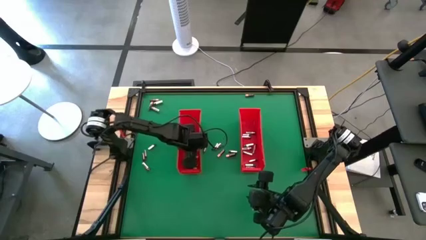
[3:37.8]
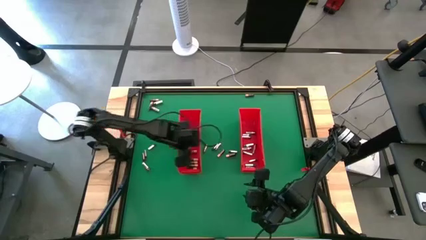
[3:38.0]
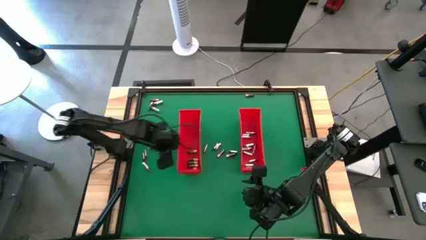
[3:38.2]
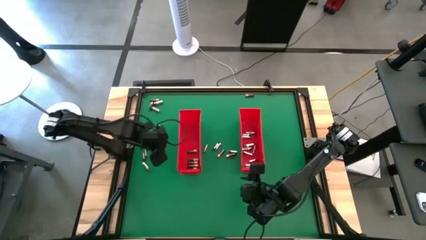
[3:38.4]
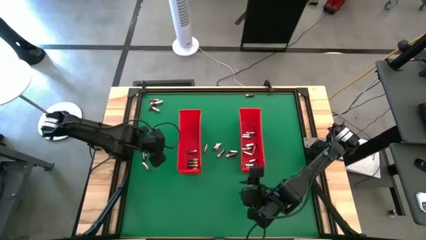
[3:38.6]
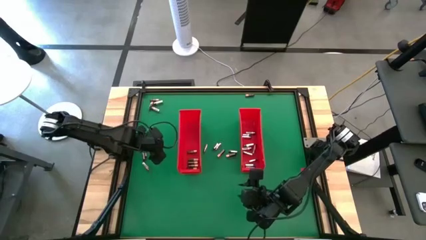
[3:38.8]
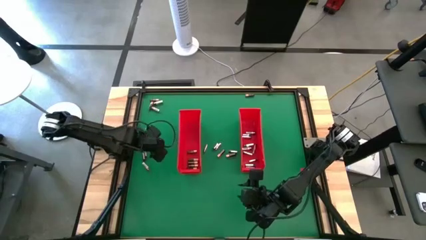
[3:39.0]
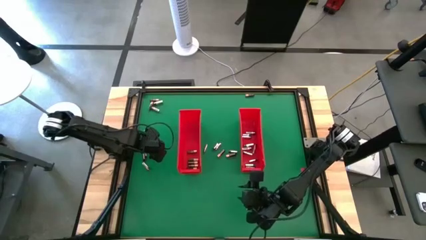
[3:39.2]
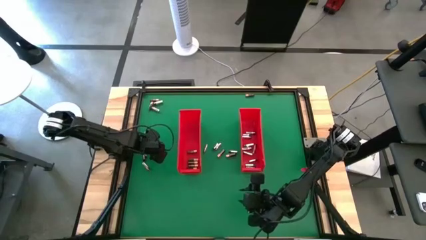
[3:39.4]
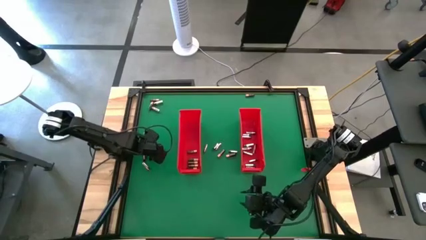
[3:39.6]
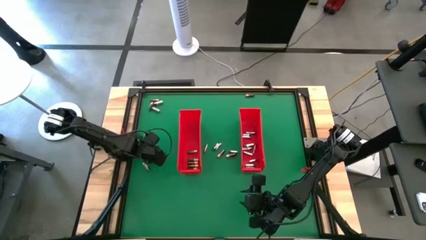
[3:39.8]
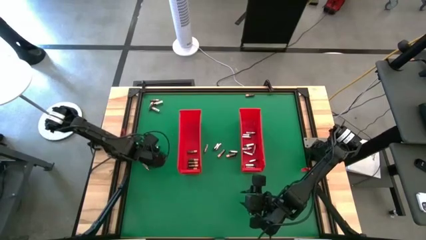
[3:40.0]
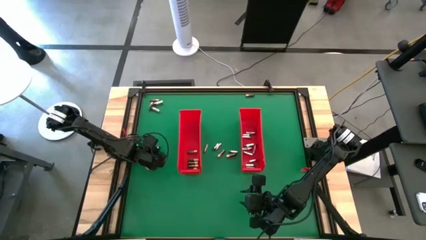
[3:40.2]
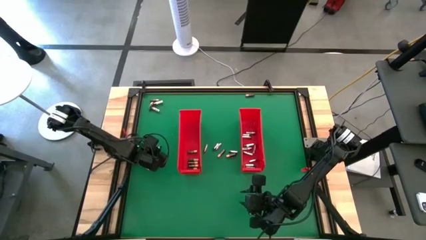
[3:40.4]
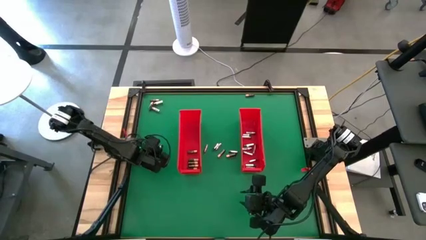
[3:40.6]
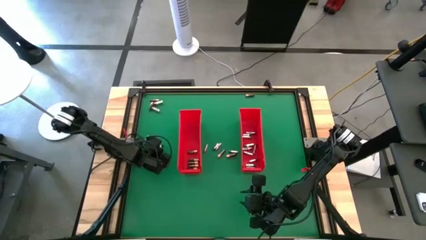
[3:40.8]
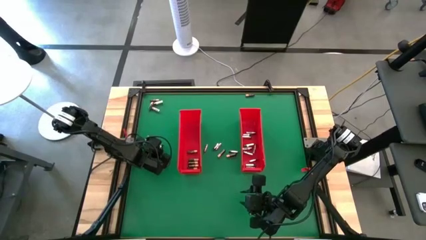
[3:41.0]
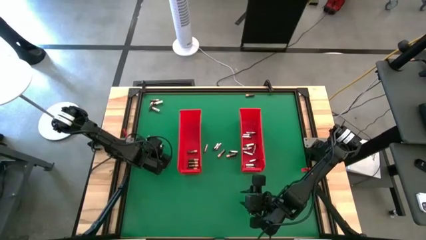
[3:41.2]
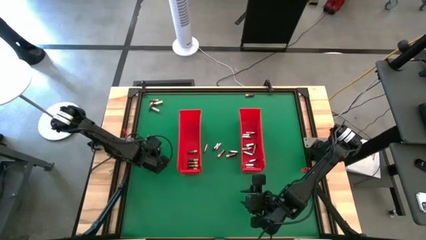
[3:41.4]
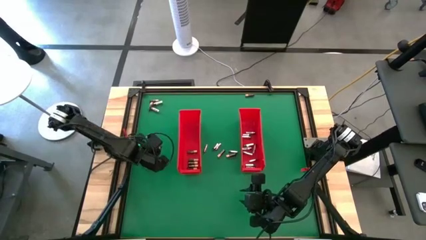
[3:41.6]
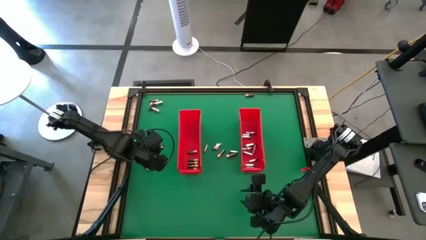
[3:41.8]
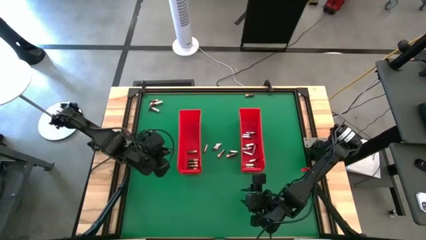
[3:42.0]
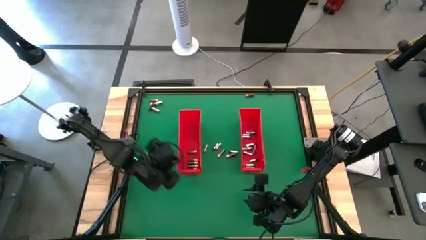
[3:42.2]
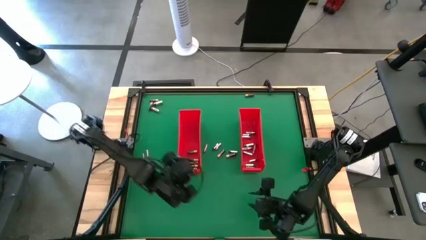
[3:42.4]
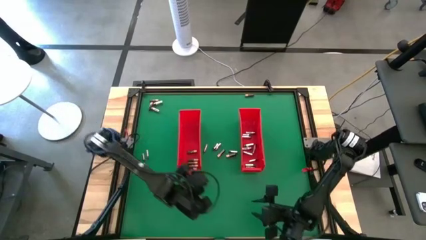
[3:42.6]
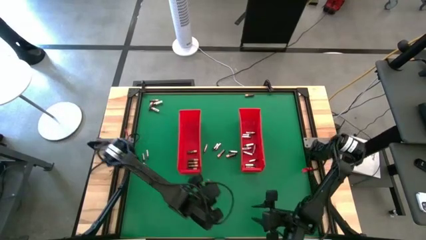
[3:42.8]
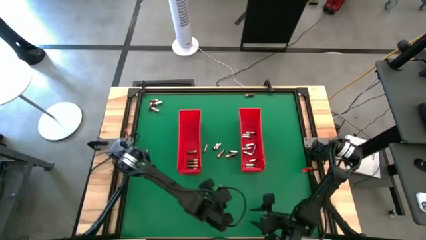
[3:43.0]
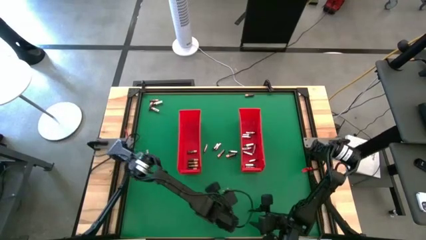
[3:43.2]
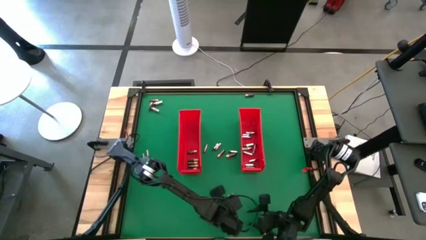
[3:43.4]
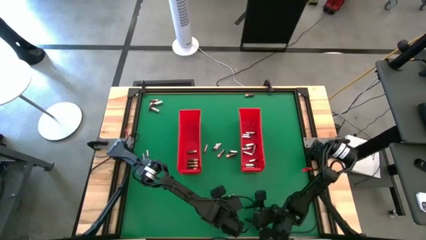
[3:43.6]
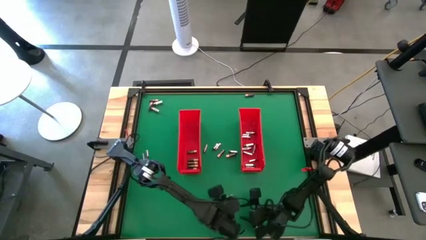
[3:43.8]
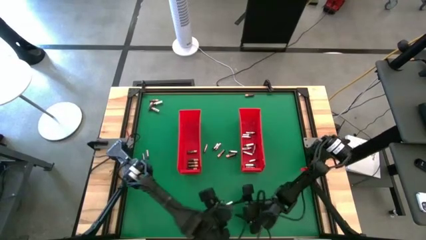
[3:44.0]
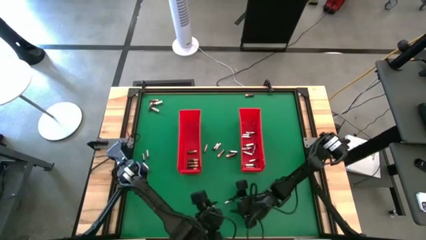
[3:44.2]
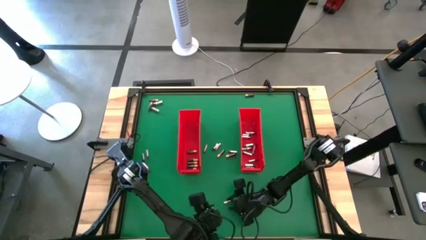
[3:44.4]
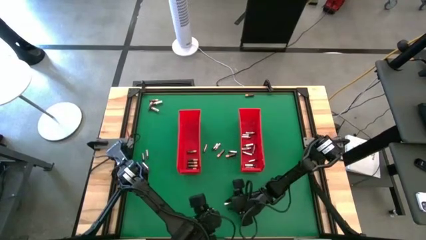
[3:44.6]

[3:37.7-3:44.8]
Task: Sort batteries
Put the silver battery into the right red bin

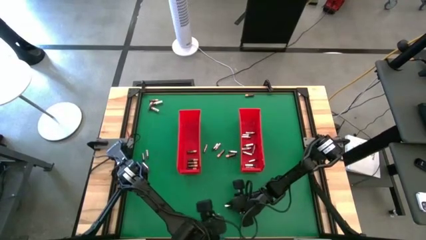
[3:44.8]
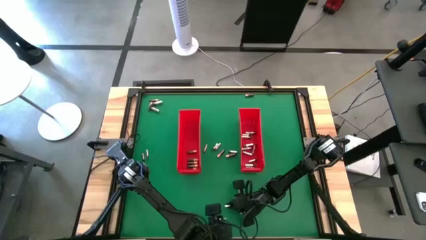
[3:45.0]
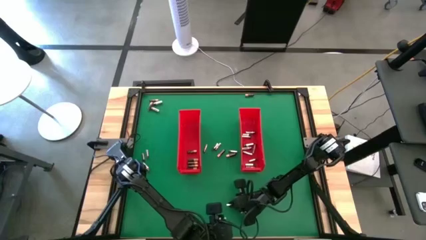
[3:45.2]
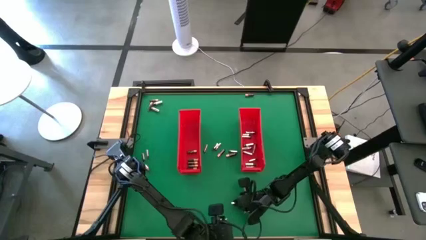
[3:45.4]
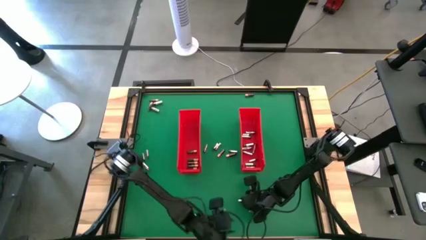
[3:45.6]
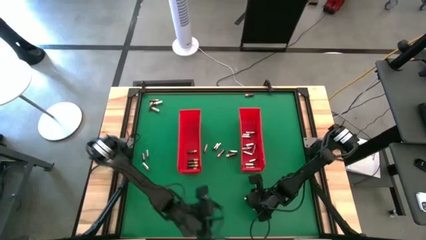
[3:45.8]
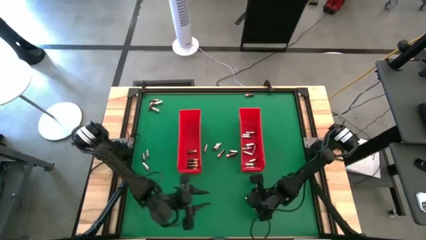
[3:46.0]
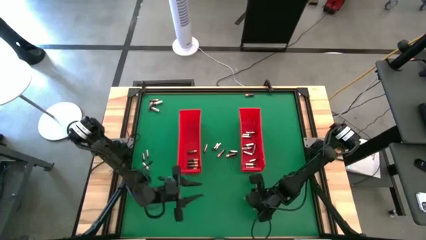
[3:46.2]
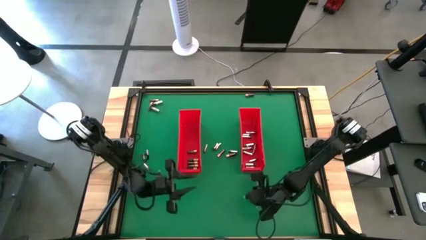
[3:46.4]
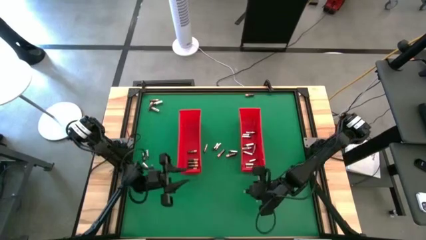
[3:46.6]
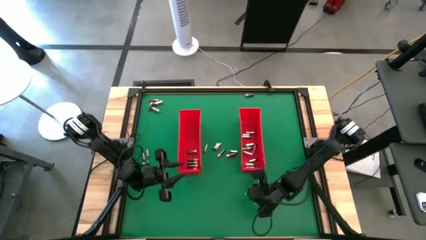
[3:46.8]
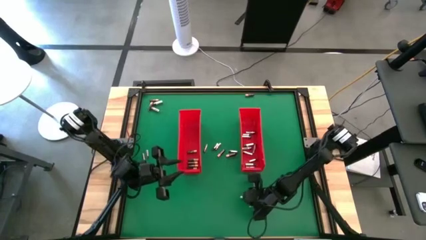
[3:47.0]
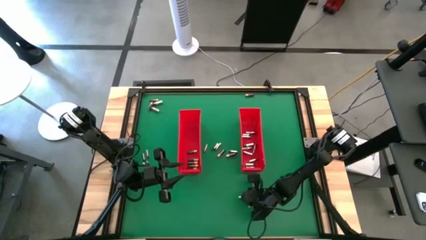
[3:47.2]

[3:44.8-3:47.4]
Put the silver battery into the right red bin

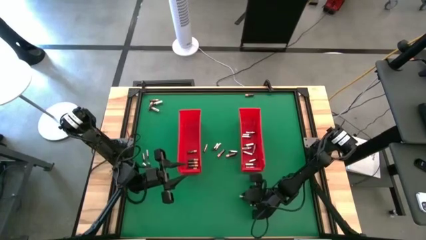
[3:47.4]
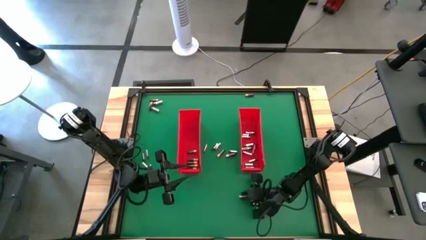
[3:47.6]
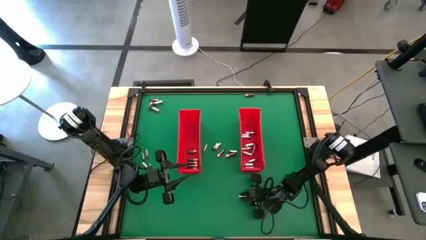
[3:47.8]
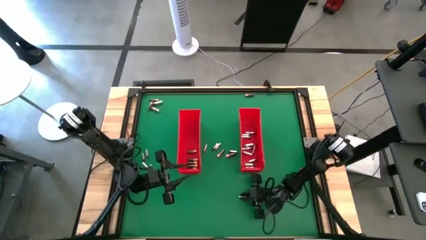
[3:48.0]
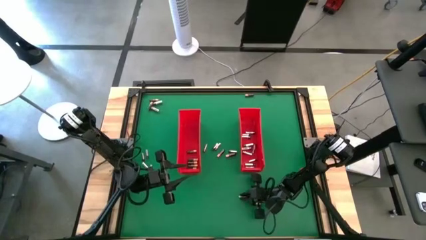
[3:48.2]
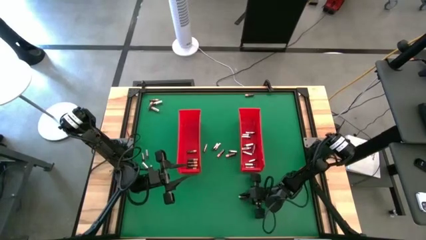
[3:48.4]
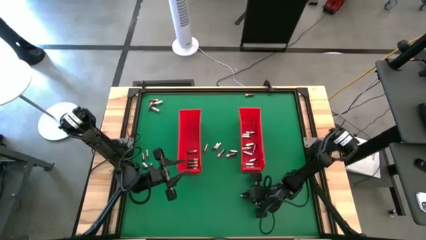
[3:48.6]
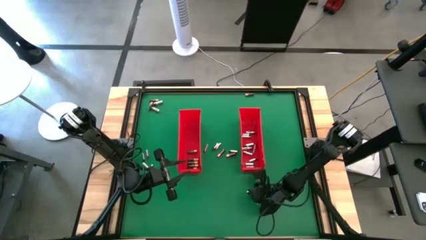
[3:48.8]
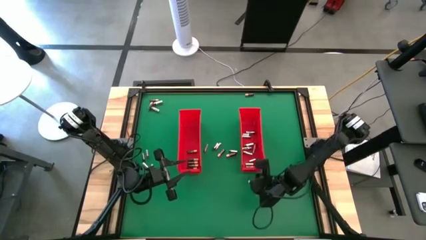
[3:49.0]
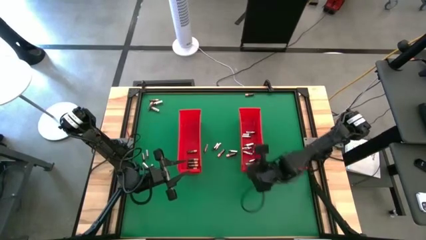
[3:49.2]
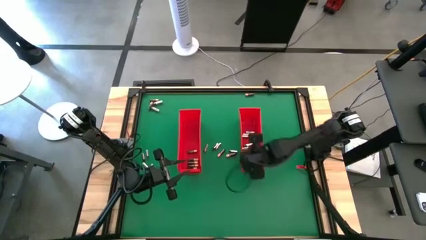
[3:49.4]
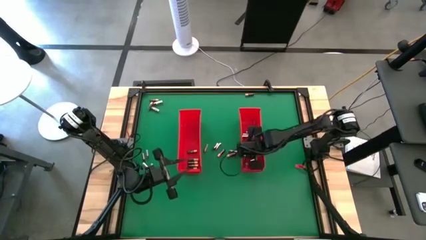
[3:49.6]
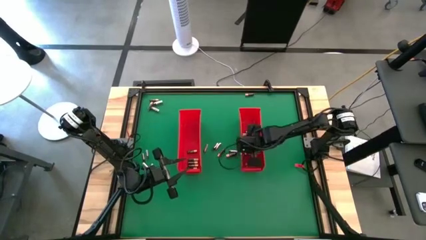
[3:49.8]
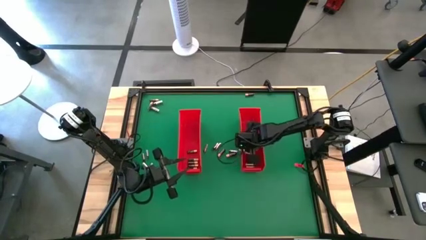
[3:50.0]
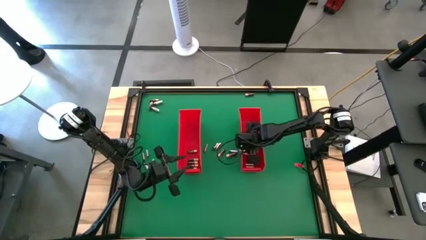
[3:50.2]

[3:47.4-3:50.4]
Put the silver battery into the right red bin
